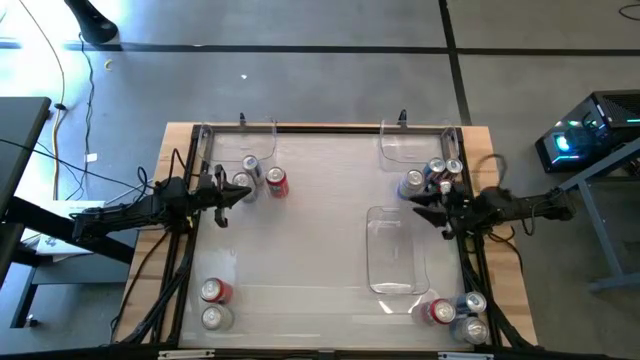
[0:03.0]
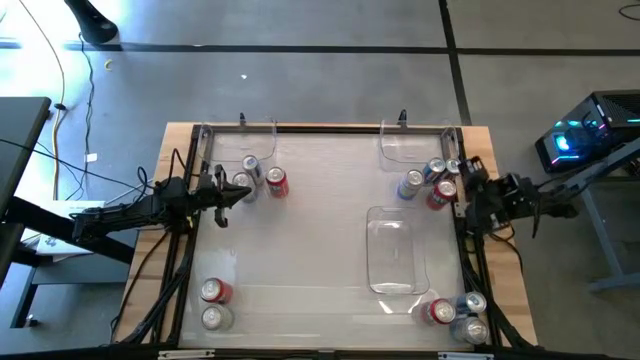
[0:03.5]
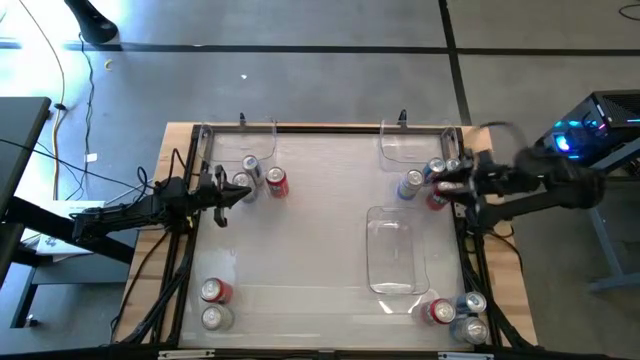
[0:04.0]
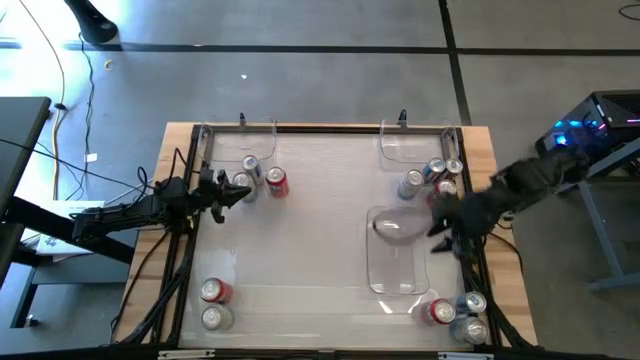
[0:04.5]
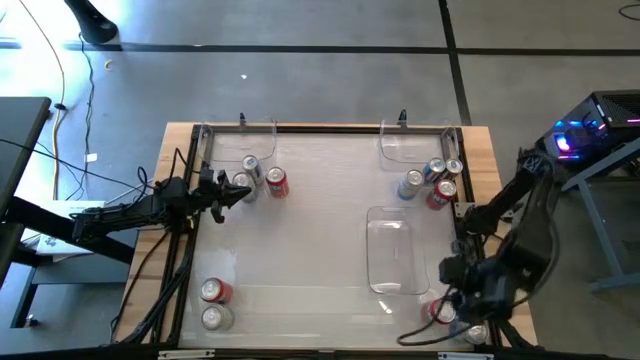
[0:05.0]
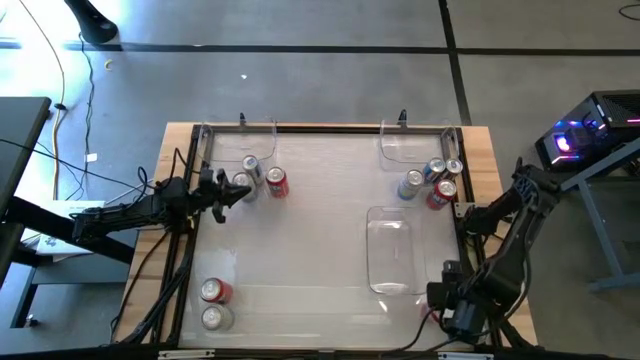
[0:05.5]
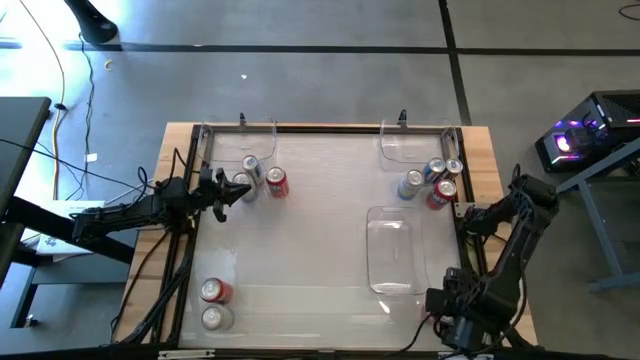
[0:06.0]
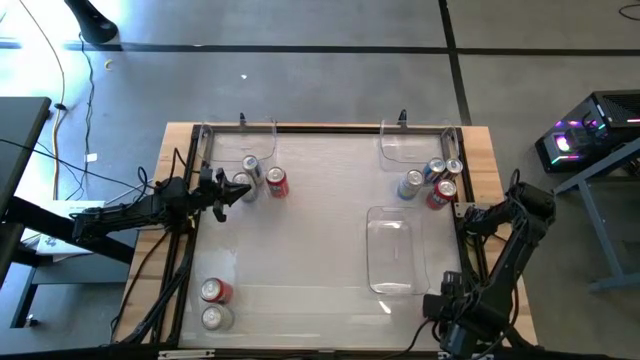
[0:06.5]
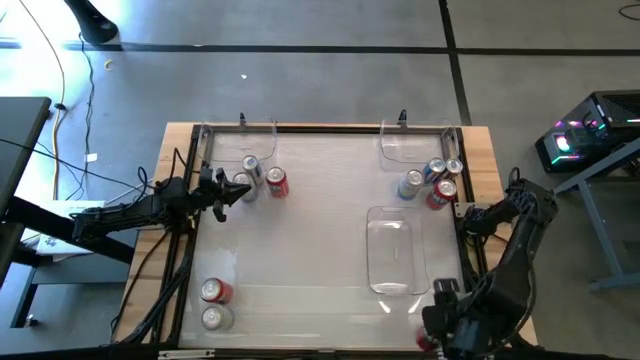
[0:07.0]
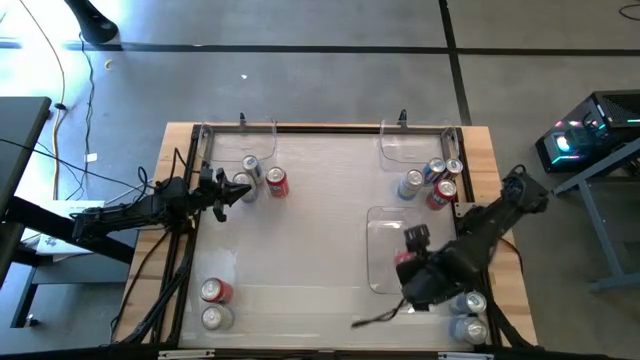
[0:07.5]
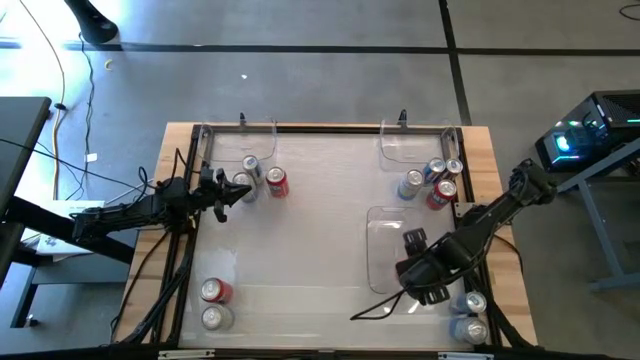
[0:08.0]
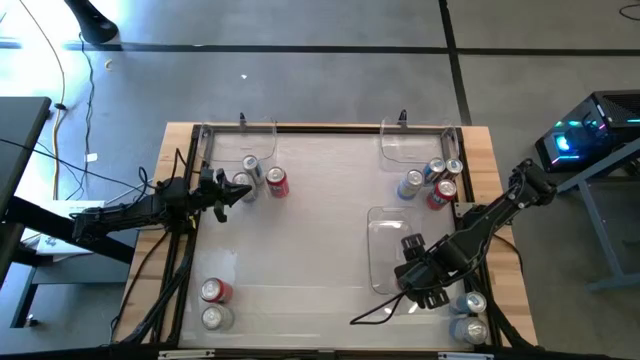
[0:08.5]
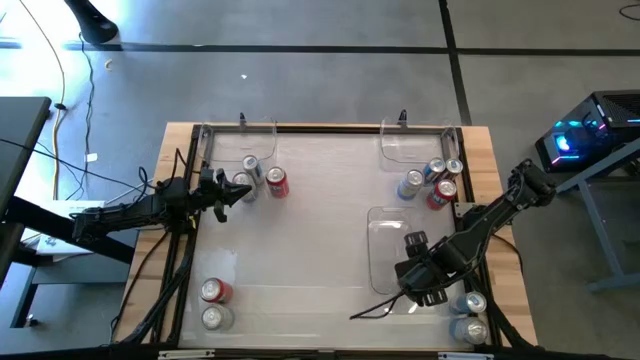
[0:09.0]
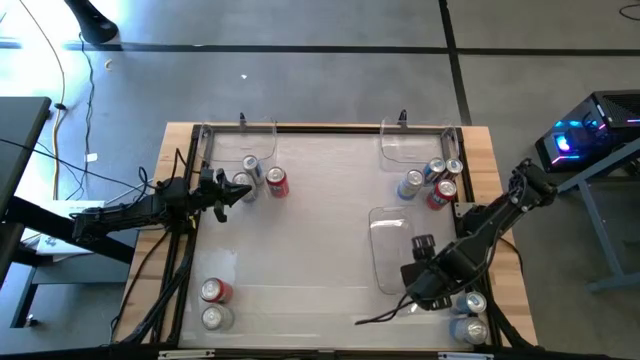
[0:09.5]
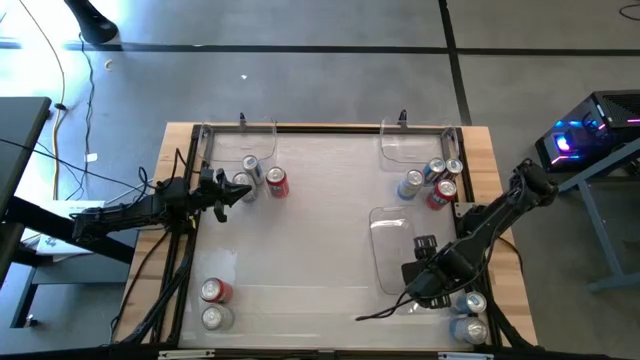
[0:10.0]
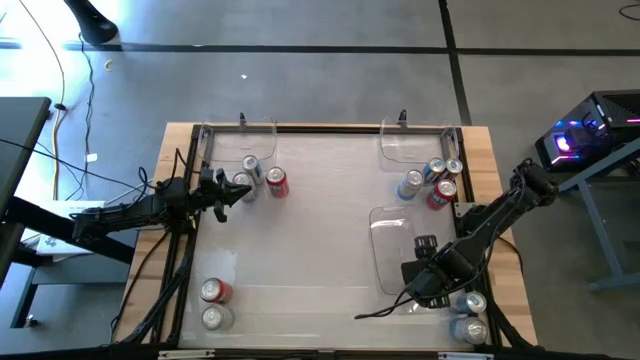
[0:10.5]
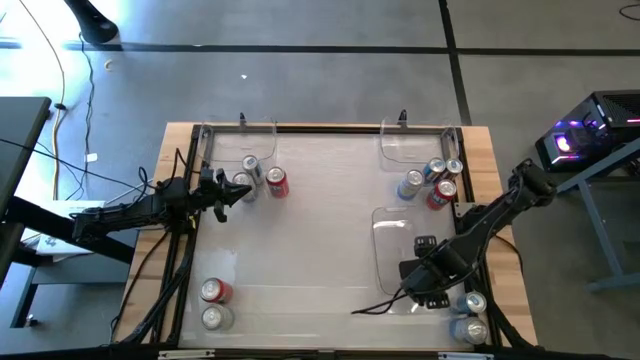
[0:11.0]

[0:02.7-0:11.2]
Task: Sort soda cans
Put the bottom right orange soda can into the bottom right transparent bin

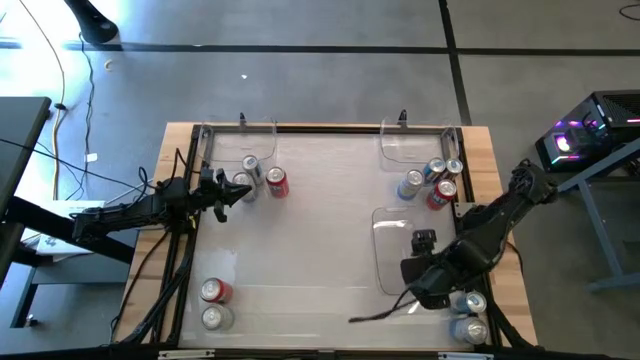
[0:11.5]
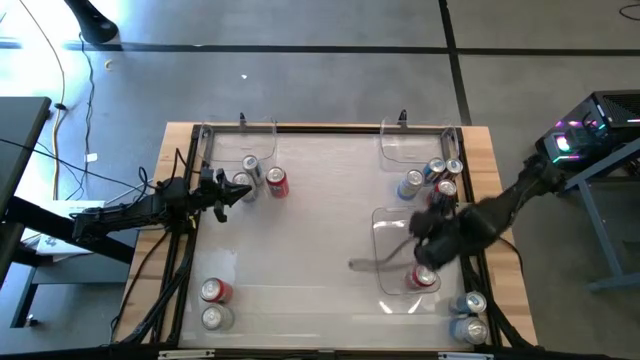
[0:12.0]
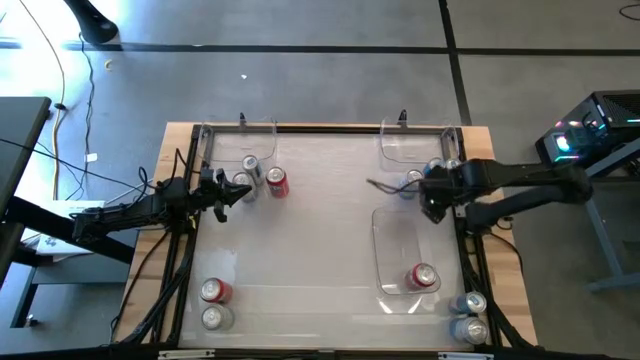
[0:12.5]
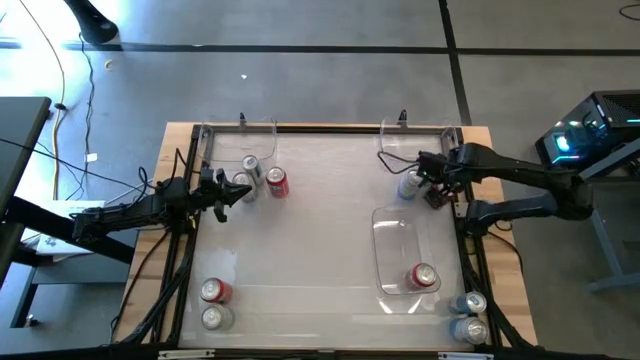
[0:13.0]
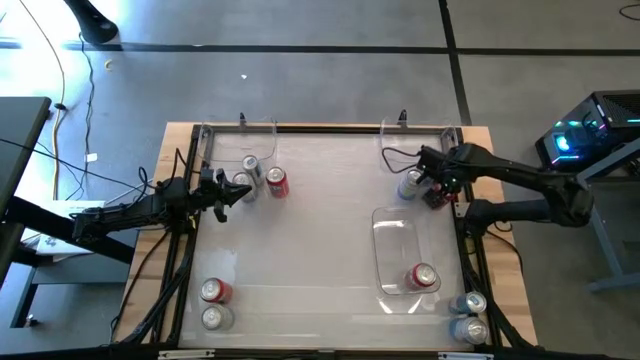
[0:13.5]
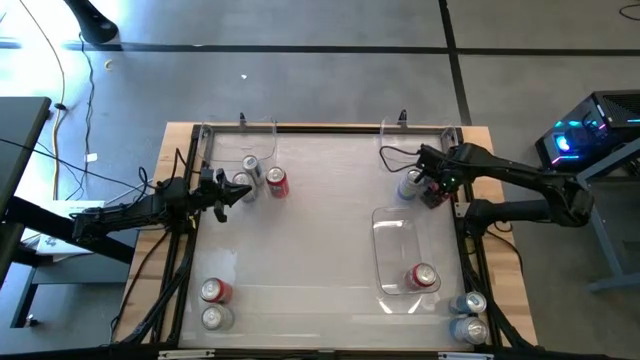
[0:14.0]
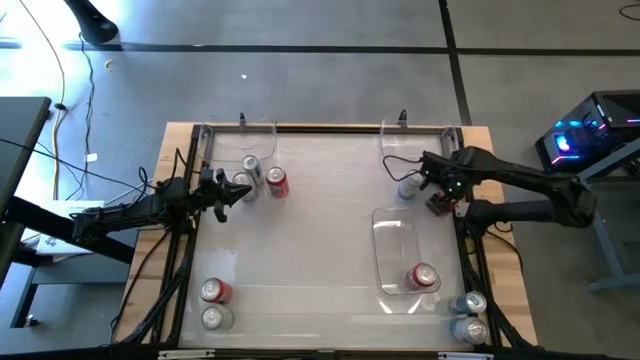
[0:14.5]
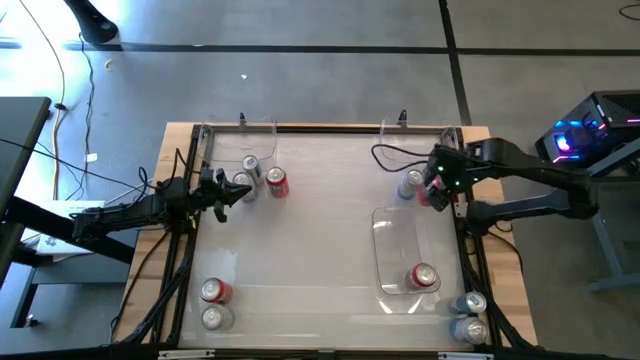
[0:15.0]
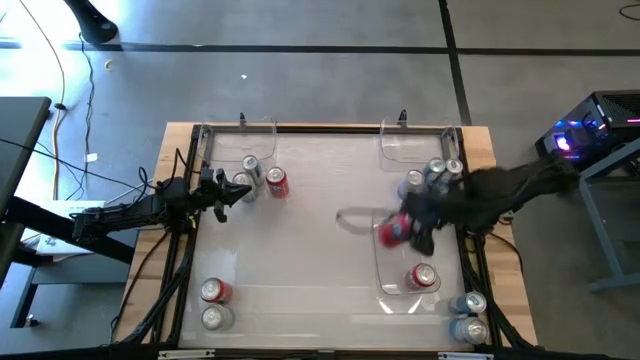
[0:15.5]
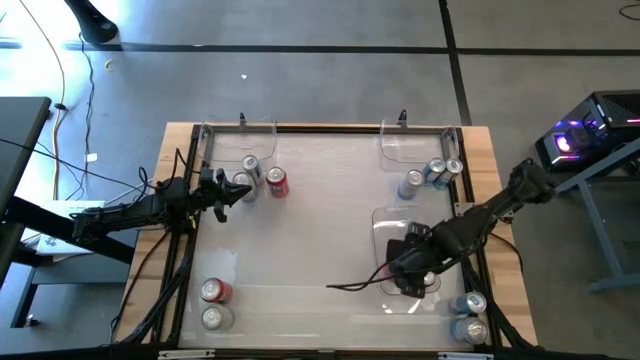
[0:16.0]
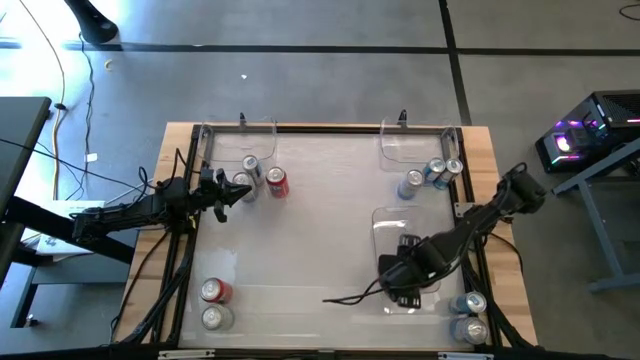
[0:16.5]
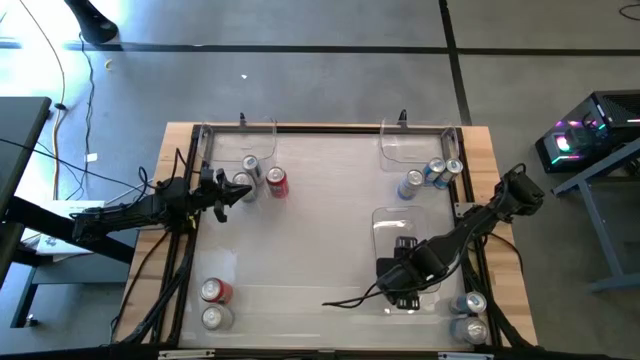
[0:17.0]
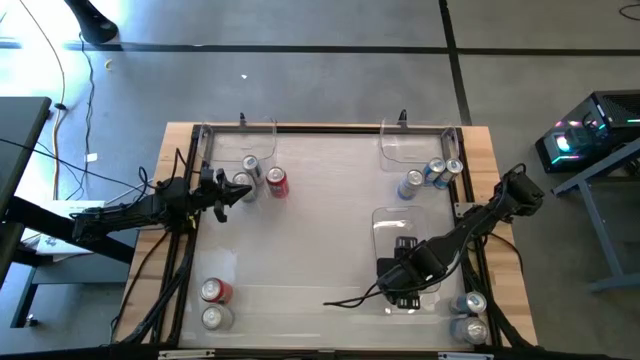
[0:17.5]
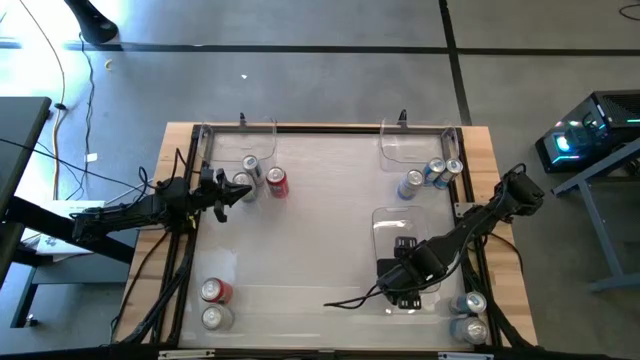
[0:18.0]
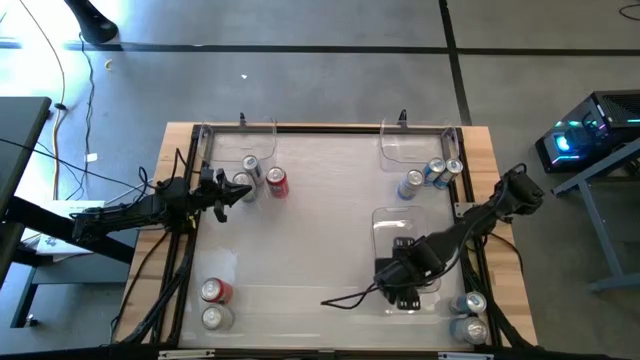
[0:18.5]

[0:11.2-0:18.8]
Put the top right orange soda can into the bottom right transparent bin

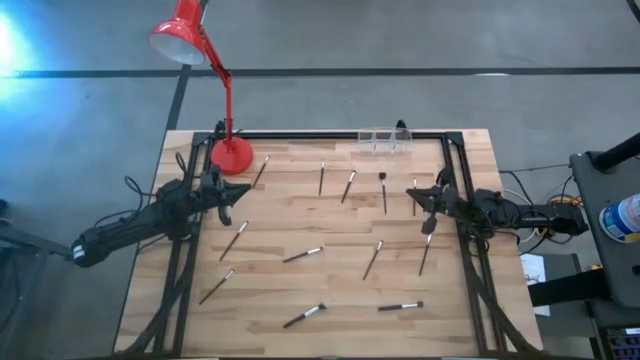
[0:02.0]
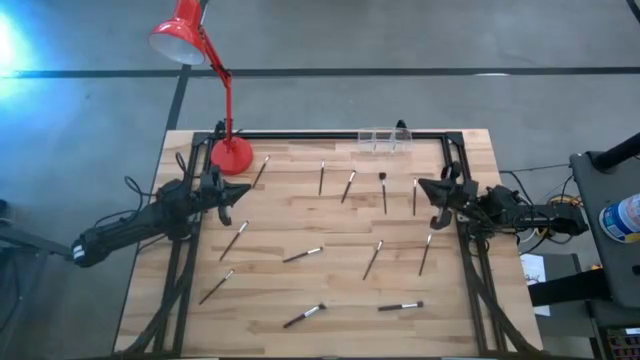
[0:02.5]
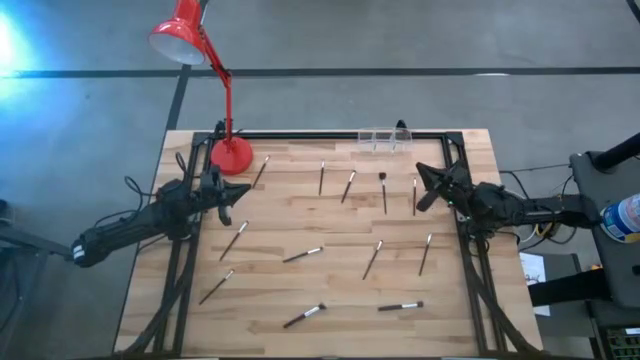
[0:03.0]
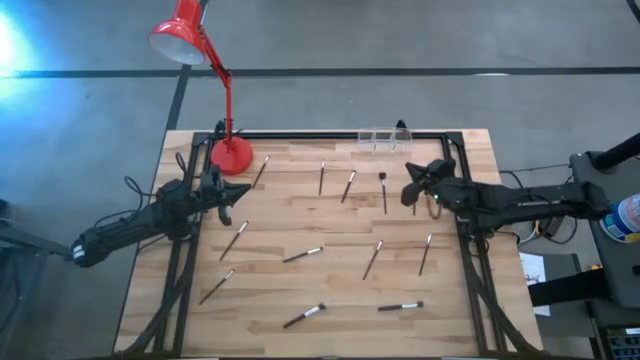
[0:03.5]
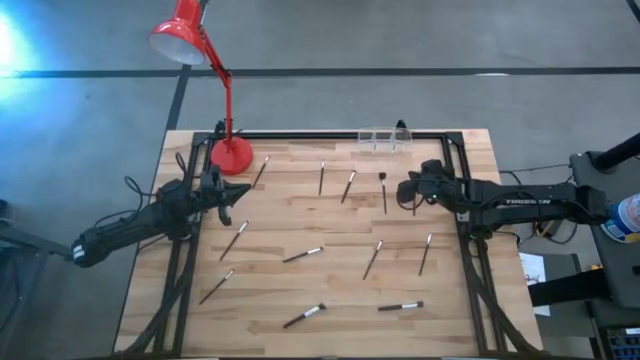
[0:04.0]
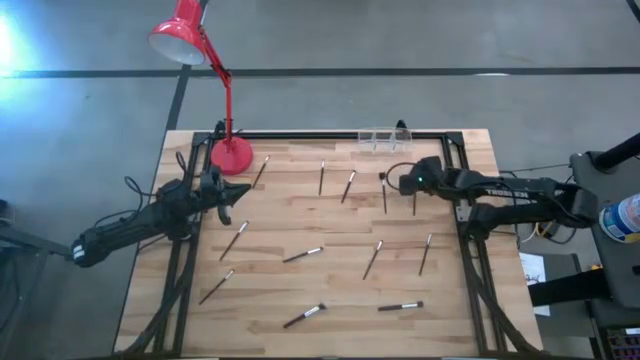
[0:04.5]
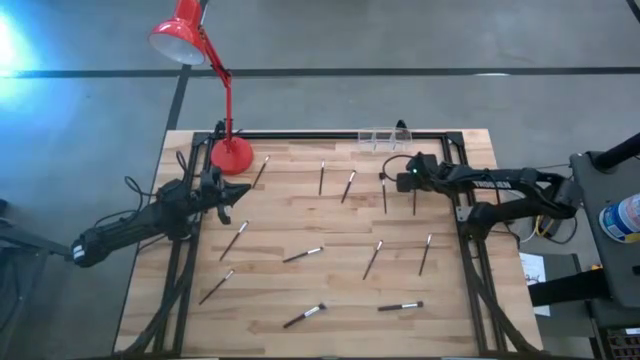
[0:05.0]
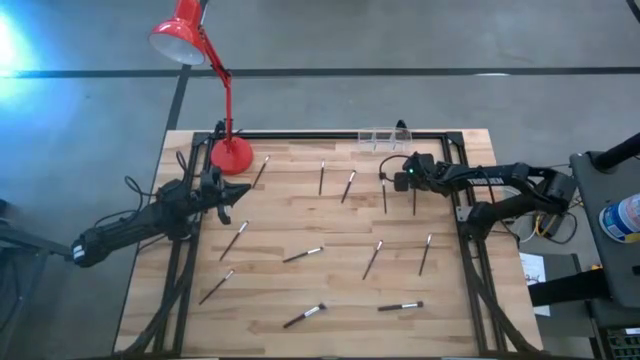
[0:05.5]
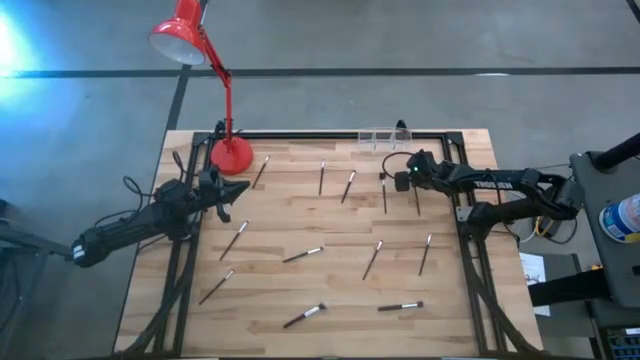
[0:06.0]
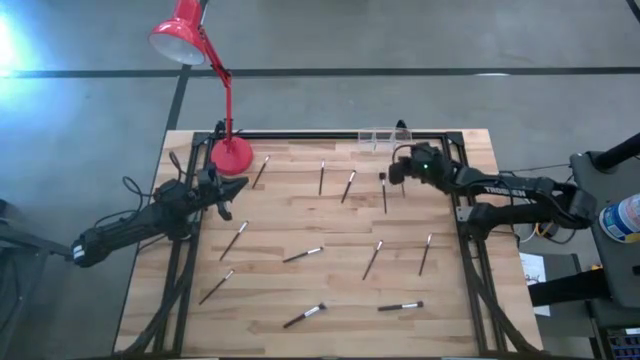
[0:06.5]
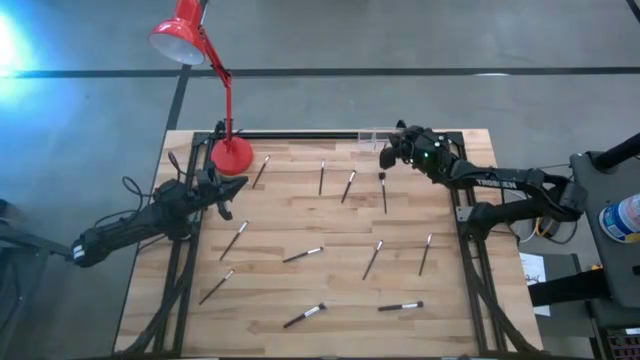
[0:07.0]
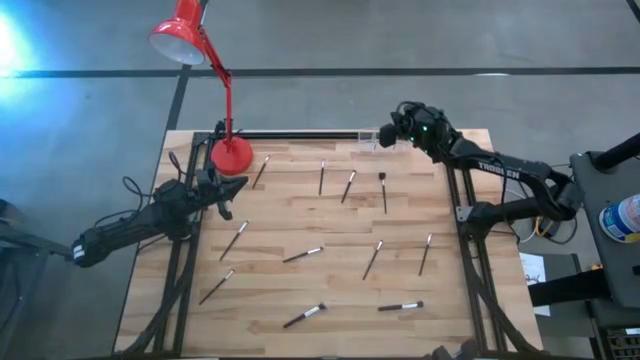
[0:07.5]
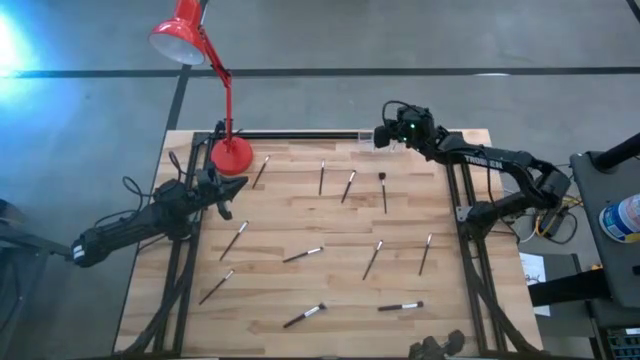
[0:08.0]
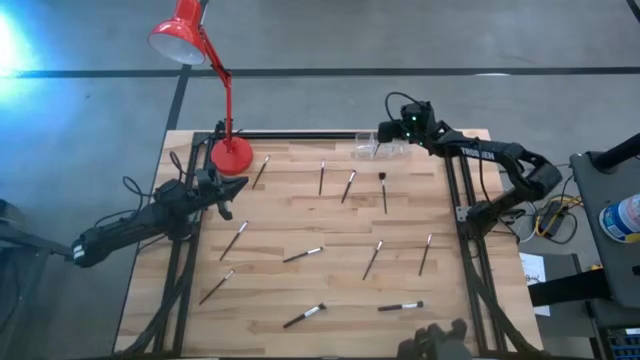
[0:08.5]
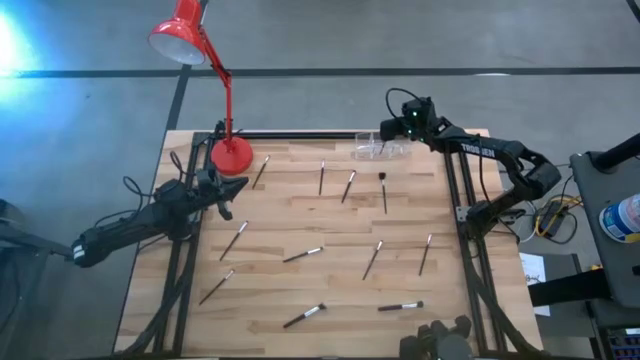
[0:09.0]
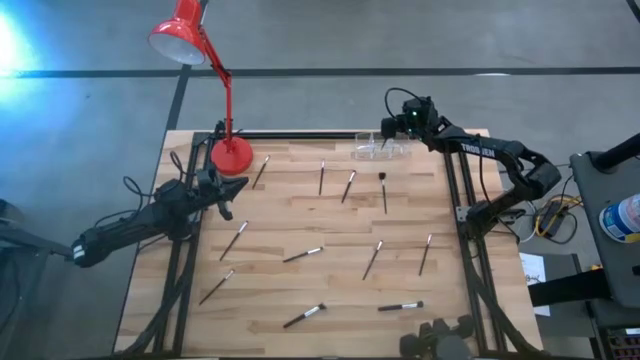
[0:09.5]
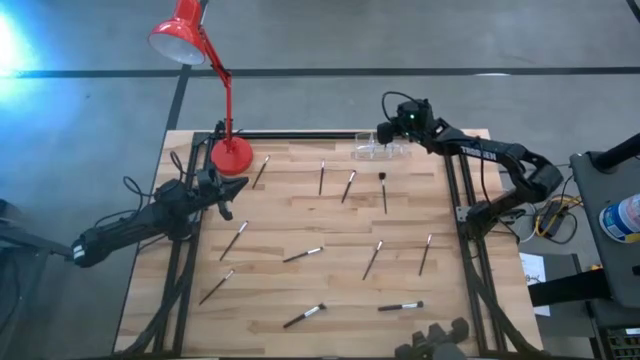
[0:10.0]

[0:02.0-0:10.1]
Task: Put items in baskets/containers
Put the eyeshadow brush into the transparent organizer
